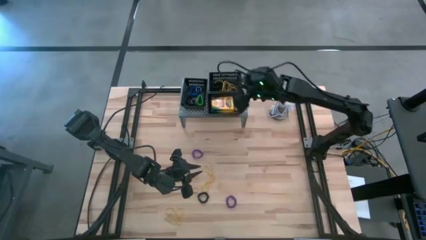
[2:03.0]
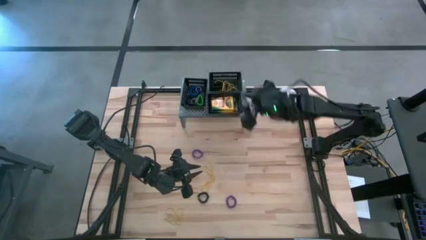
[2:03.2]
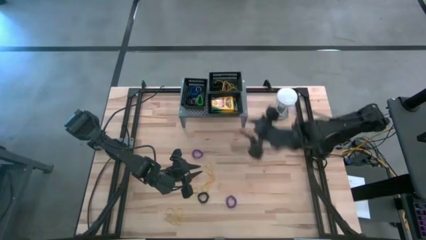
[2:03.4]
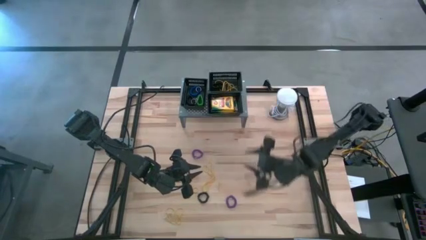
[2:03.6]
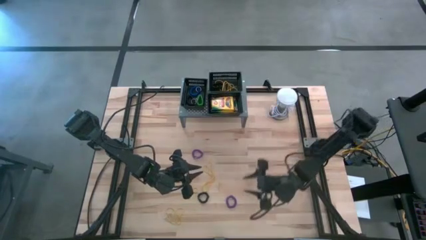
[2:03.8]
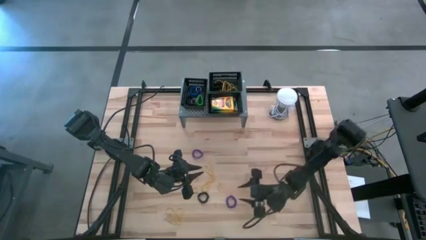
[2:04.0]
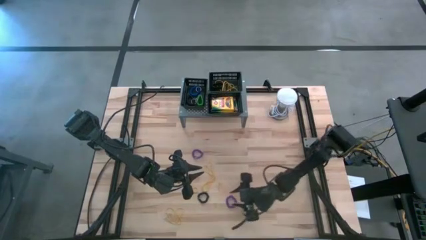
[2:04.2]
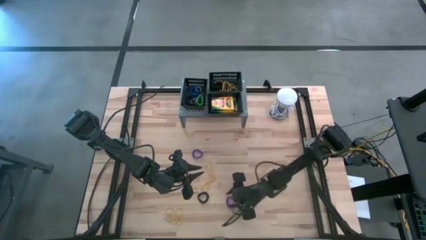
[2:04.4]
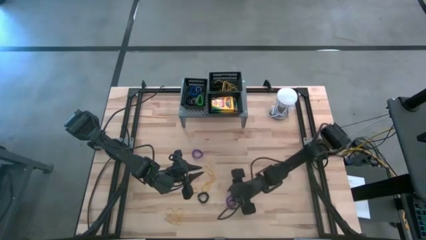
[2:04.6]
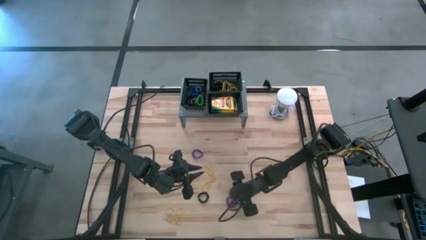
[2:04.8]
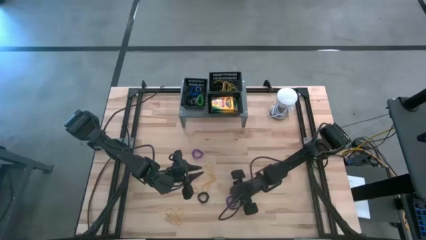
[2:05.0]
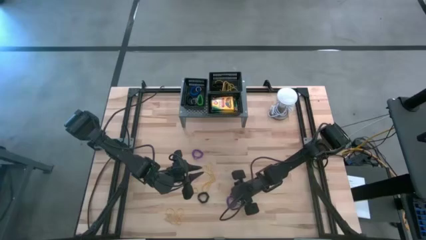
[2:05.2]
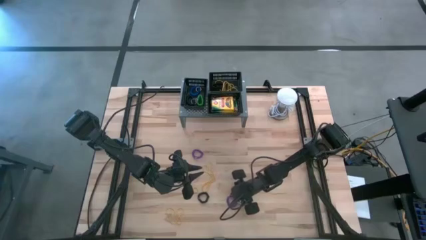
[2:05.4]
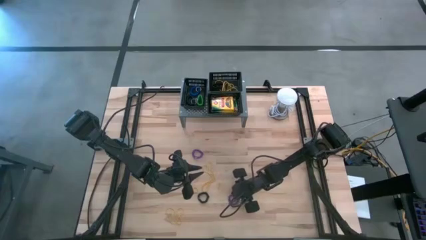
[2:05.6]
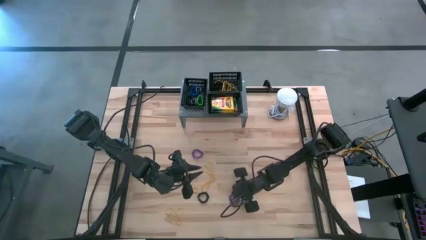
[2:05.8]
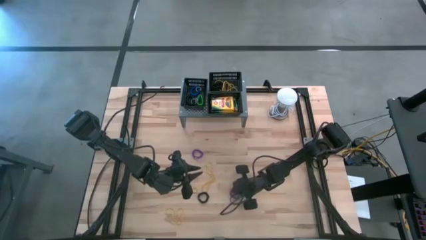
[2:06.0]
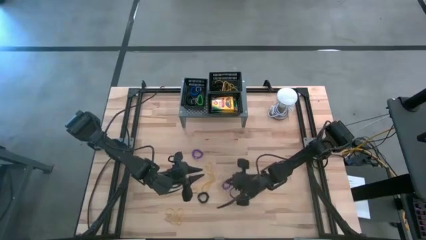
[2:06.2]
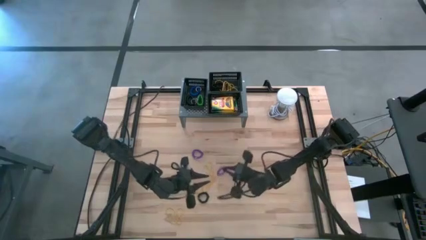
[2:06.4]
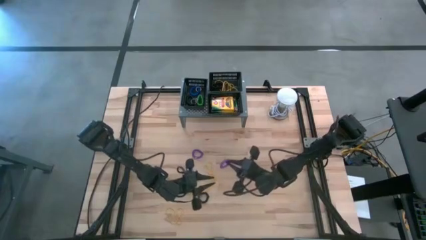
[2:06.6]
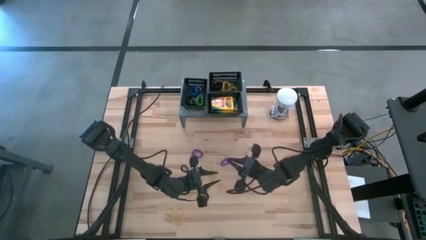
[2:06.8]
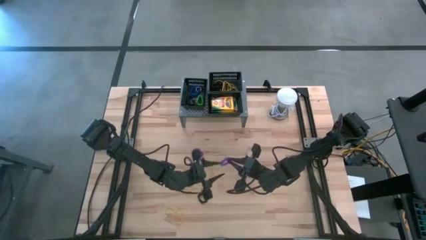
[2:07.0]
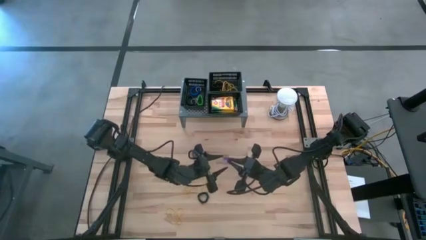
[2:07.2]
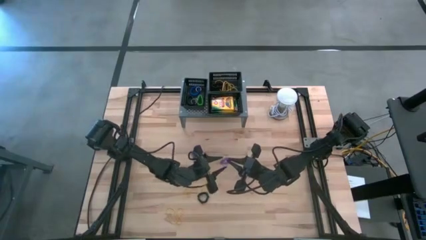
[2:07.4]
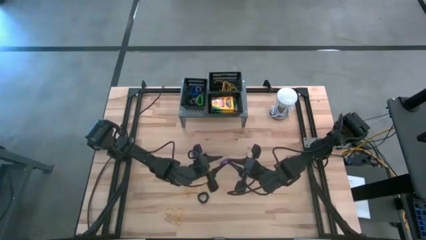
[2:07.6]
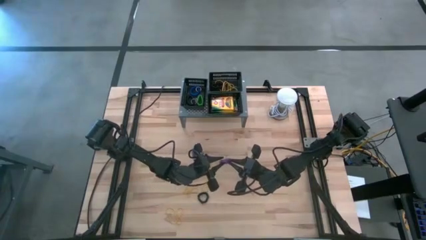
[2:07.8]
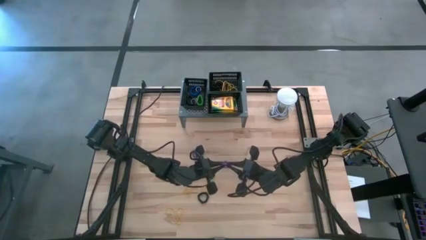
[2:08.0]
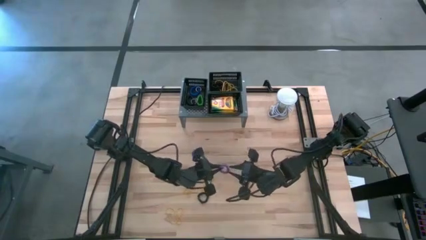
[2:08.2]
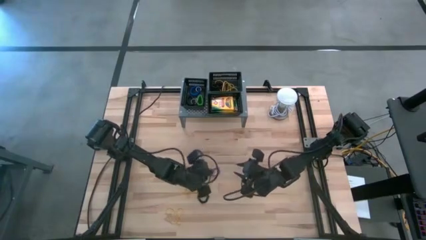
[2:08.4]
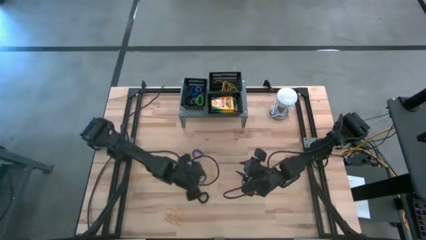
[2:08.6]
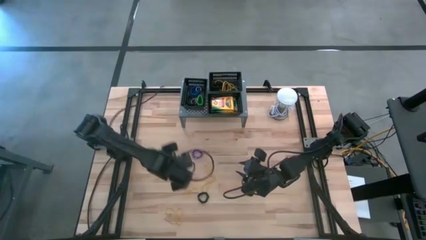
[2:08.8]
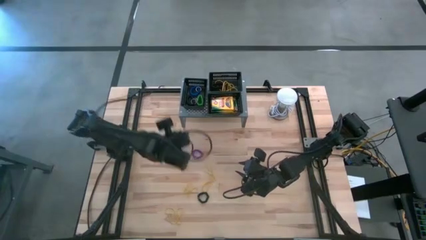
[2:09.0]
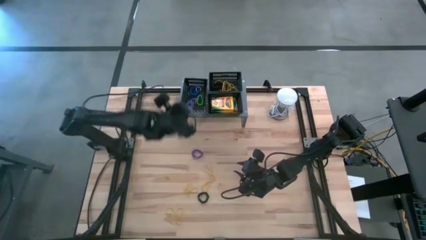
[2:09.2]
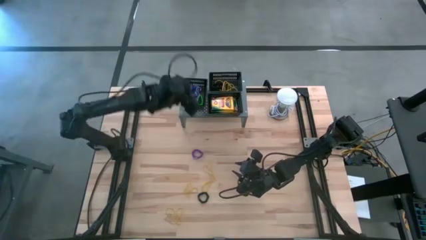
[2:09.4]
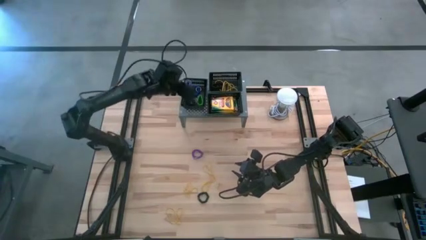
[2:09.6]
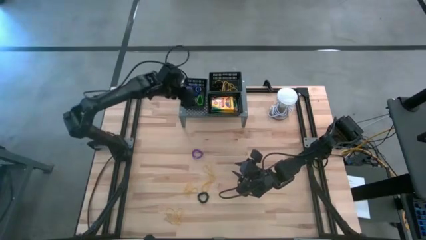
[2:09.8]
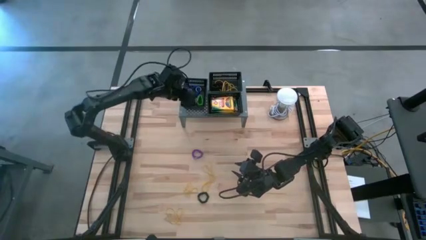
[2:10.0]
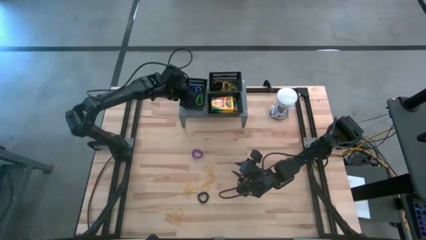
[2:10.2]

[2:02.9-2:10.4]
Task: Pick & Place Office Desk Supplies
Put the violet spring keychain into the middle black bin on the shelf

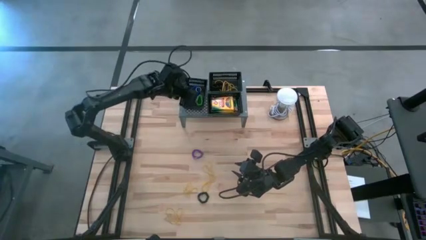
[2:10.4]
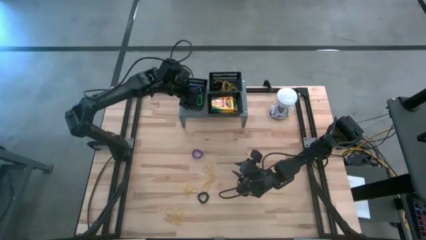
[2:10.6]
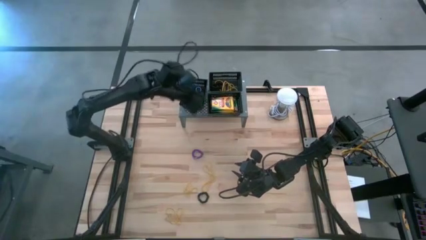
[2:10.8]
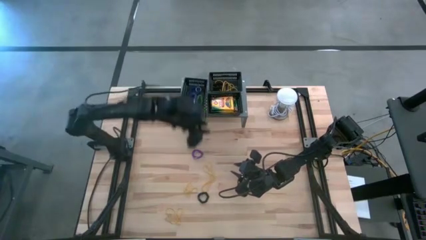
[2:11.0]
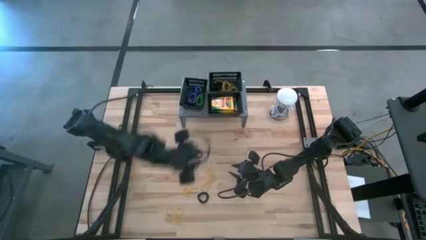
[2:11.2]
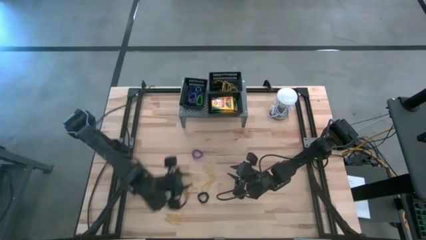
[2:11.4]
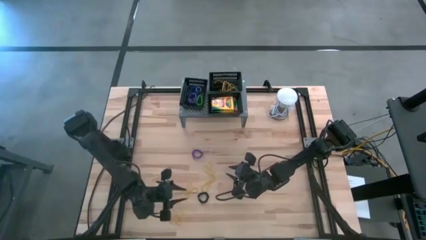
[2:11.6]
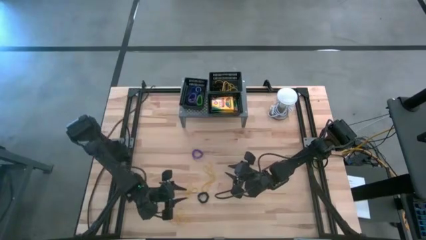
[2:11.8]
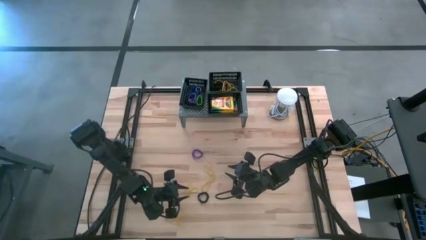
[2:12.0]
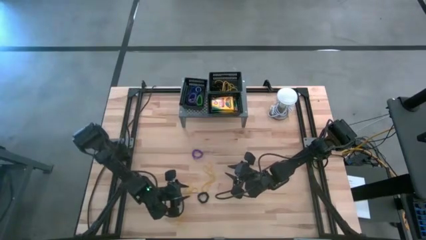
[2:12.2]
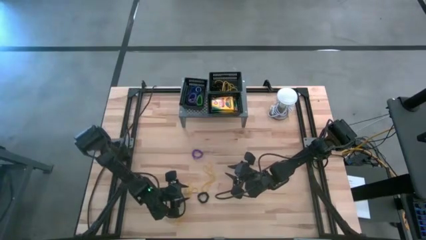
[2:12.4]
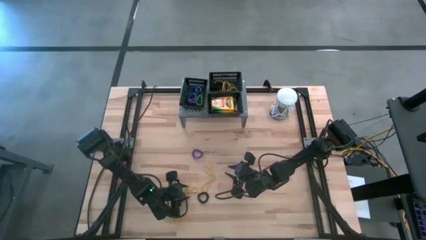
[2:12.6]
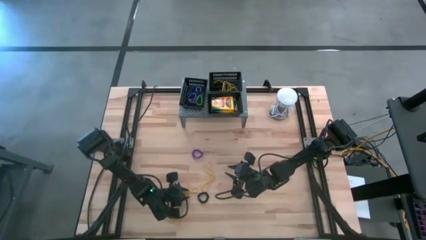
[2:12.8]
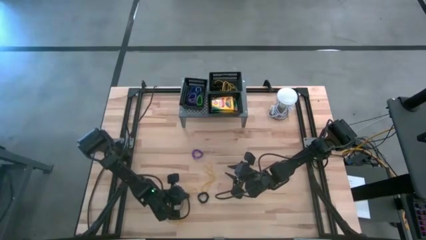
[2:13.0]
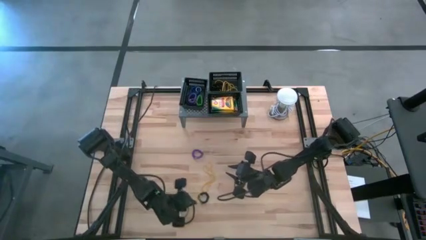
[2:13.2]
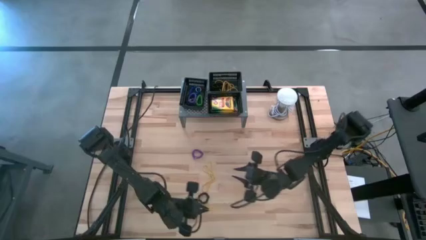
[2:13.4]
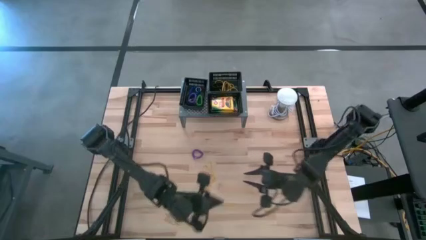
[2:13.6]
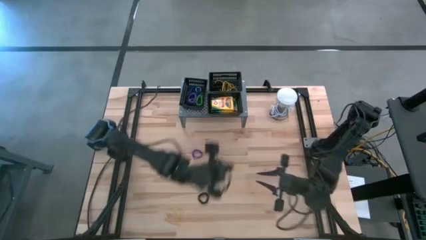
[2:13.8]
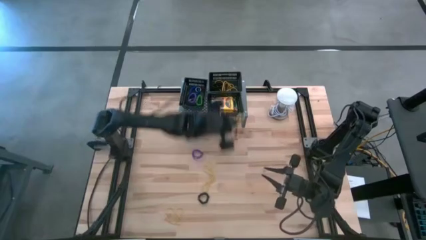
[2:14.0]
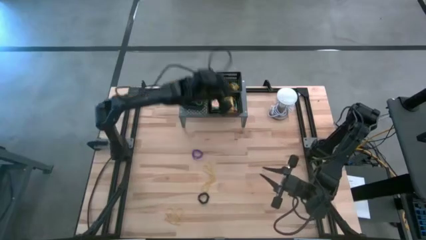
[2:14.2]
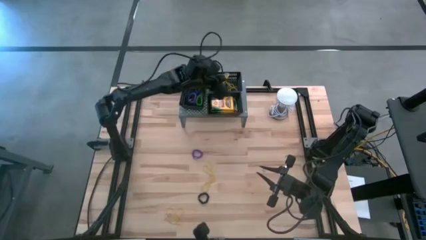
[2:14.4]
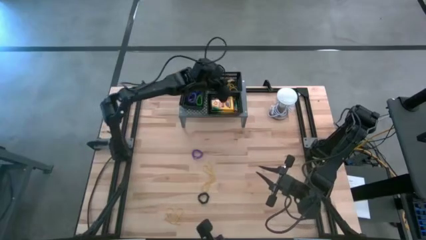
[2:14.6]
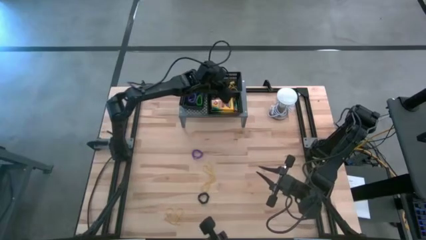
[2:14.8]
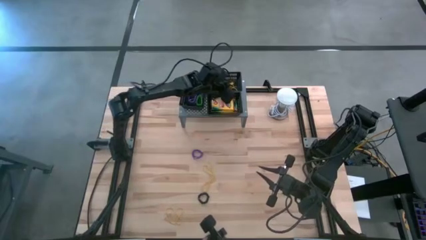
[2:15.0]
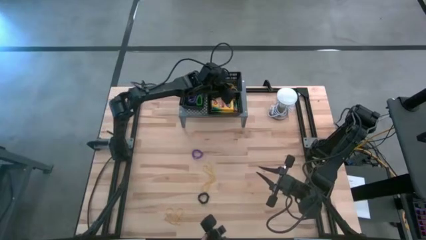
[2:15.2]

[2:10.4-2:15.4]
Put the yellow rubber band into the top black bin on the shelf

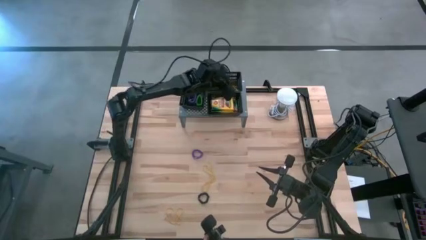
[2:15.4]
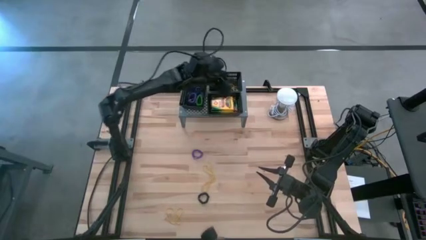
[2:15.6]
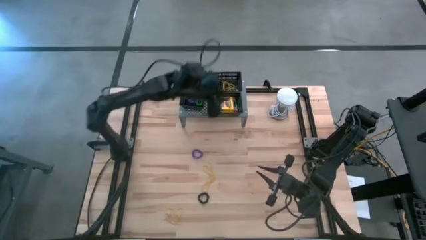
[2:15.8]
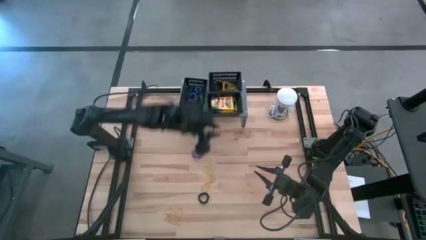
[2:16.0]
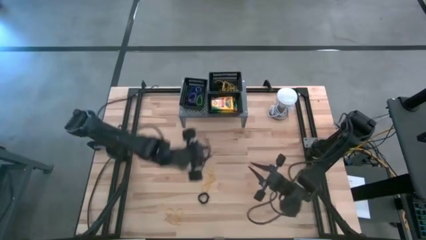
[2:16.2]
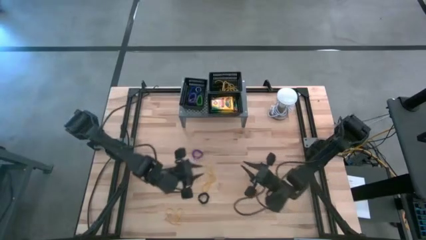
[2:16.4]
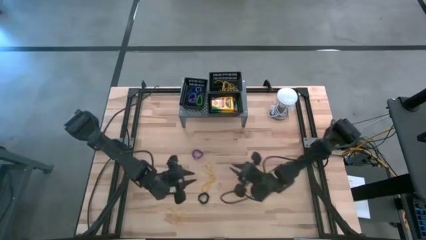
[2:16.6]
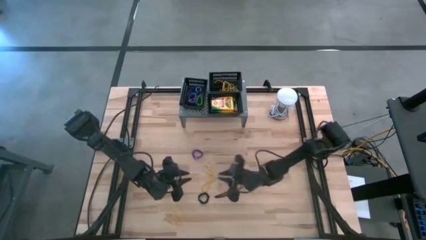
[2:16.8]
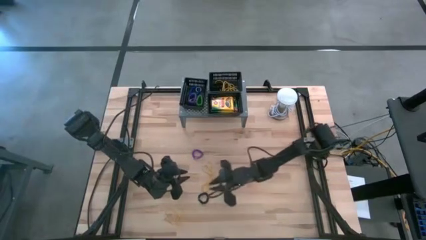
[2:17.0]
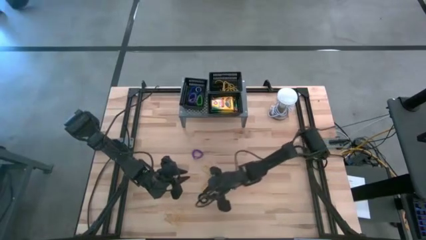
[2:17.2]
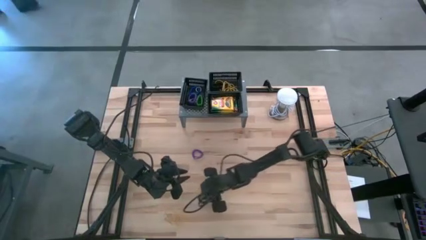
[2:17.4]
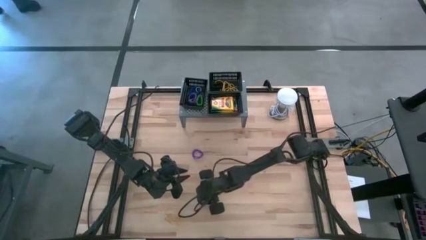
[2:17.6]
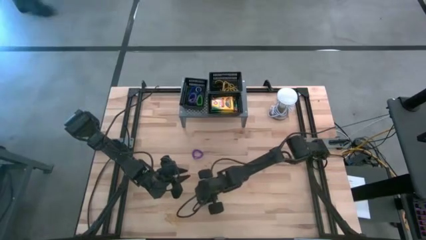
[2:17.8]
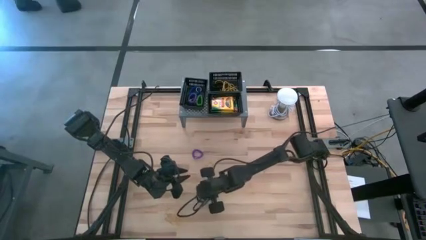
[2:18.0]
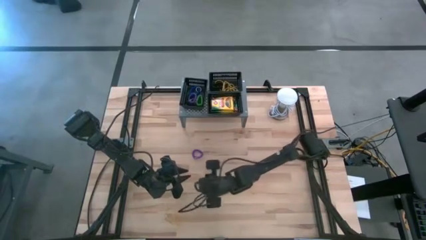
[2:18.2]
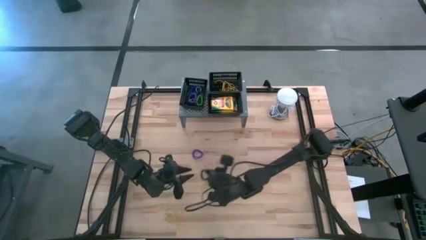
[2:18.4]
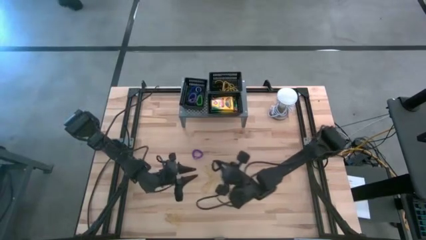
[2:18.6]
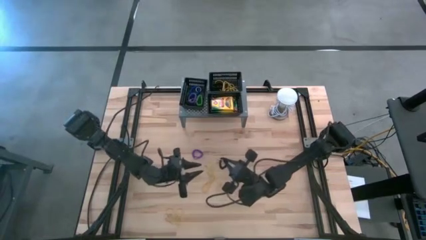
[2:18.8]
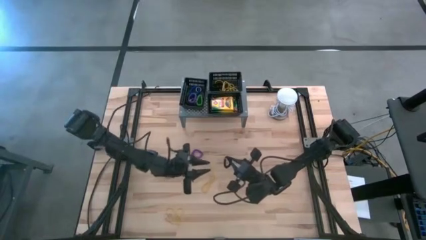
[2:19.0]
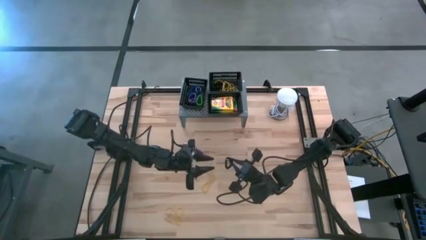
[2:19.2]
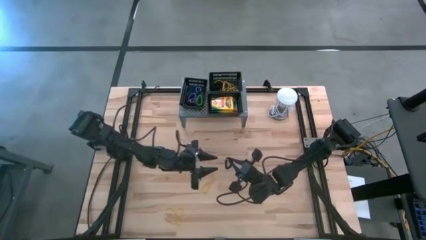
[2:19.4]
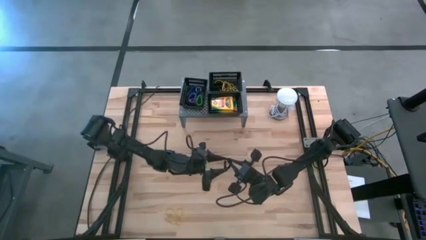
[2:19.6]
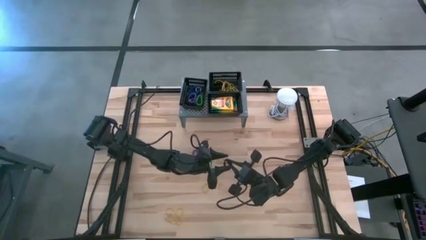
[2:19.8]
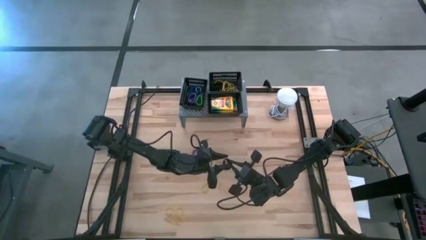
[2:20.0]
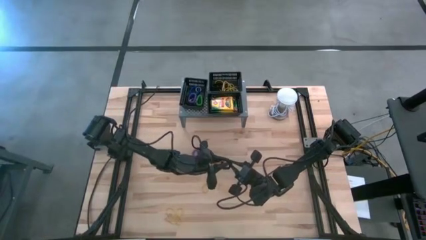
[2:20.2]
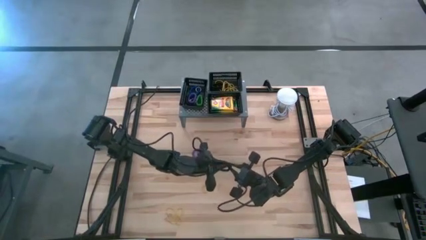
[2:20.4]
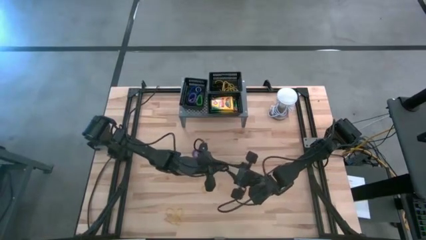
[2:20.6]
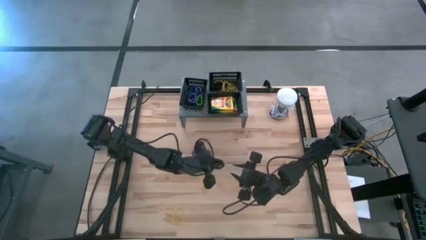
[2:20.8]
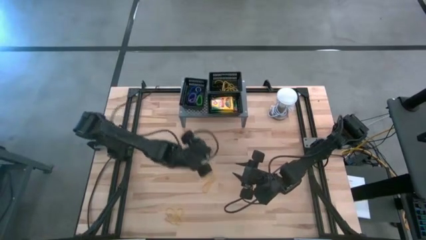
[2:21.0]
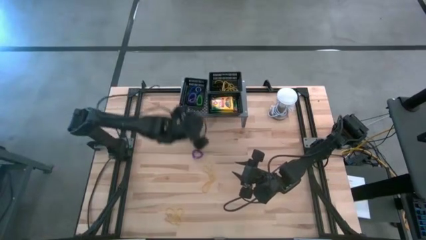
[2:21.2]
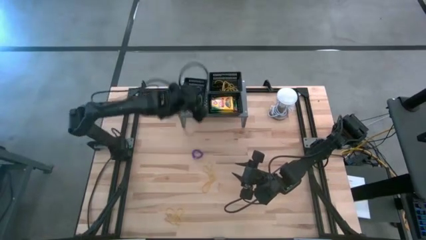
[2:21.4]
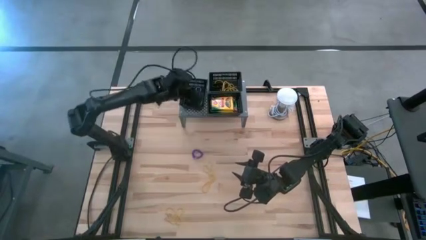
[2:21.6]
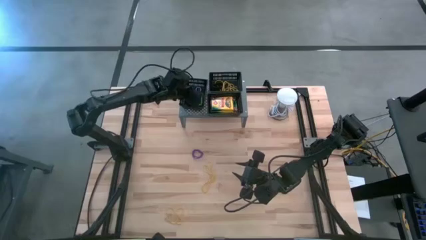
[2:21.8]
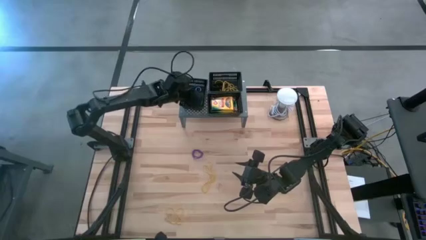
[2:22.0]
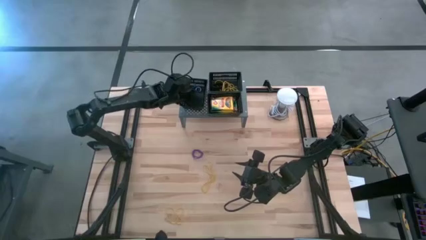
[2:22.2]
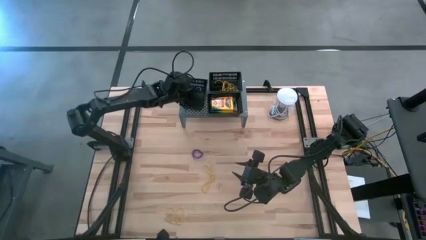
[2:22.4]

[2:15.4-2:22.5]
Put the black spring keychain into the middle black bin on the shelf
